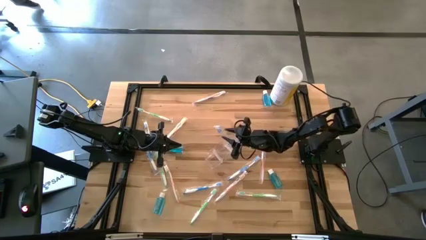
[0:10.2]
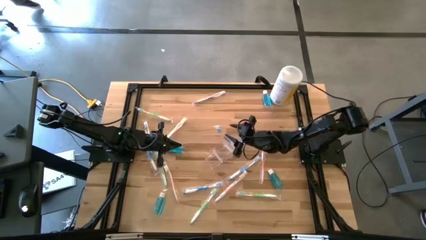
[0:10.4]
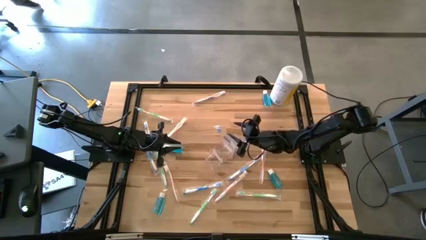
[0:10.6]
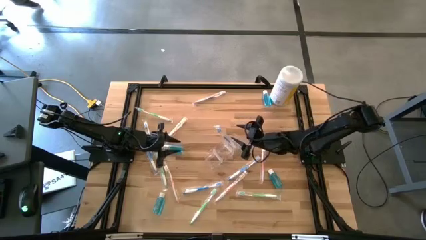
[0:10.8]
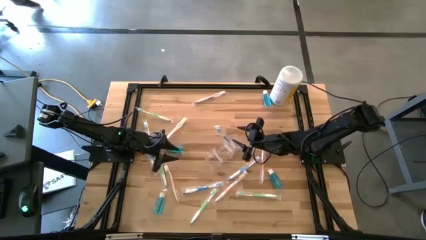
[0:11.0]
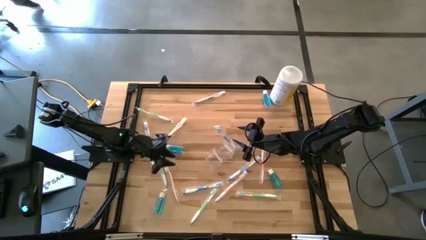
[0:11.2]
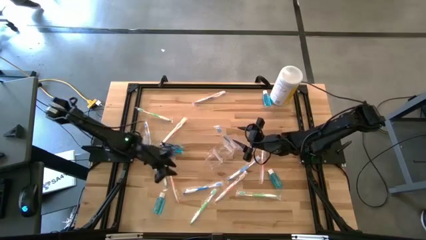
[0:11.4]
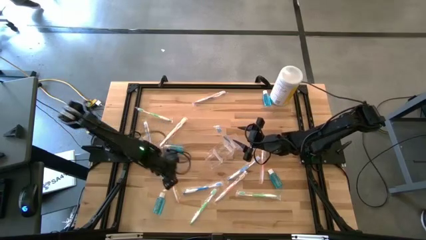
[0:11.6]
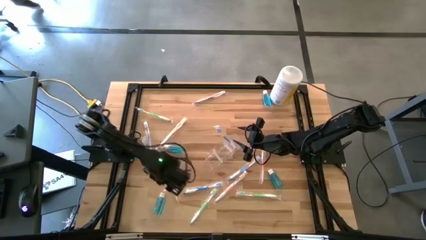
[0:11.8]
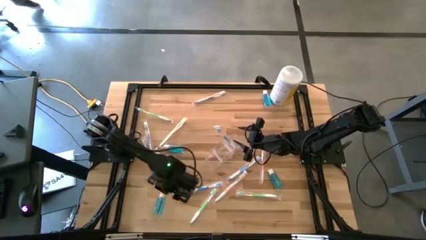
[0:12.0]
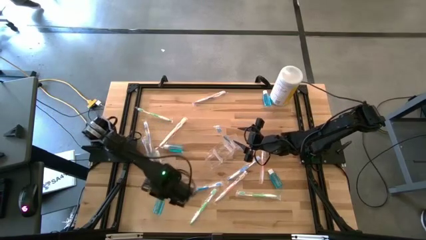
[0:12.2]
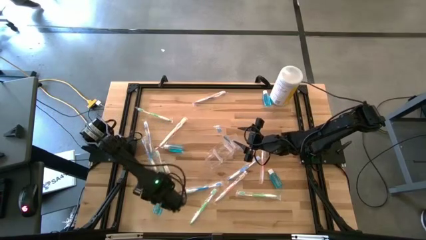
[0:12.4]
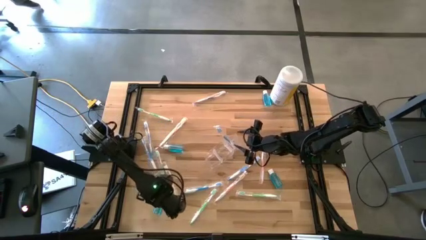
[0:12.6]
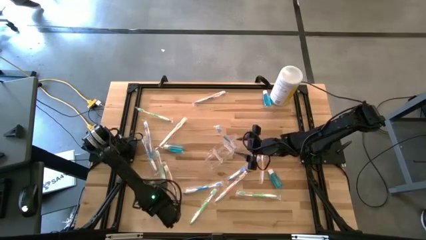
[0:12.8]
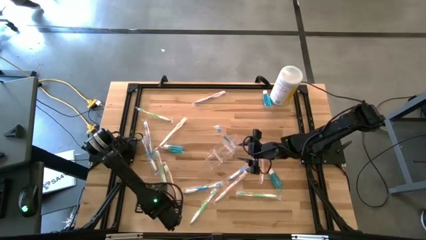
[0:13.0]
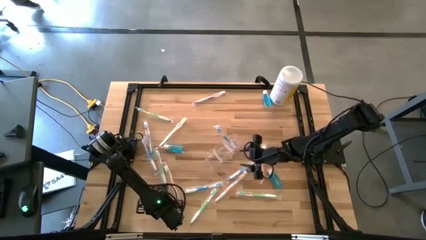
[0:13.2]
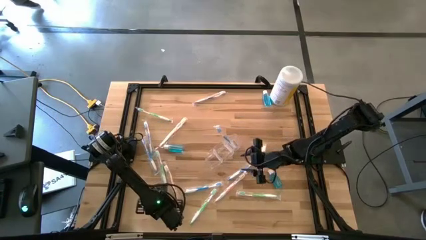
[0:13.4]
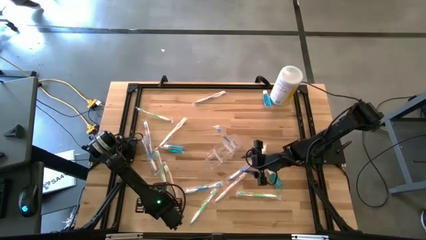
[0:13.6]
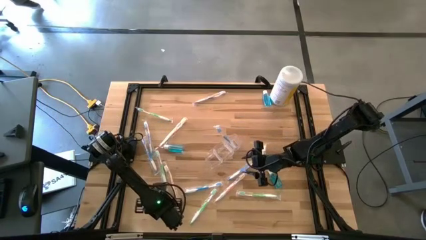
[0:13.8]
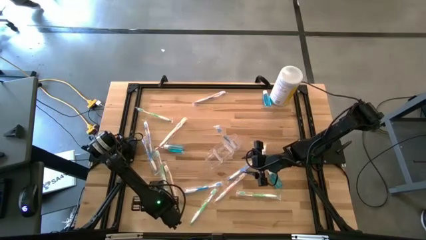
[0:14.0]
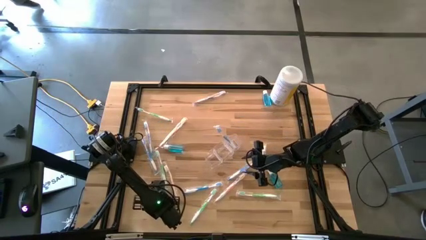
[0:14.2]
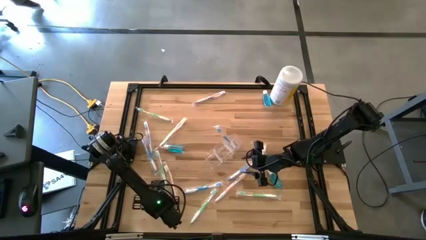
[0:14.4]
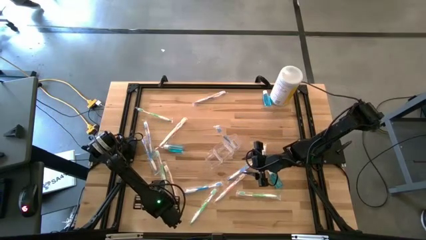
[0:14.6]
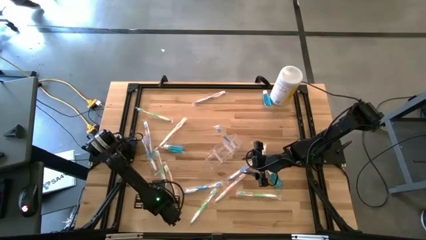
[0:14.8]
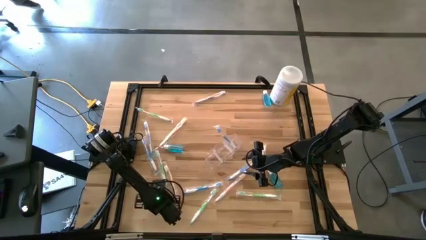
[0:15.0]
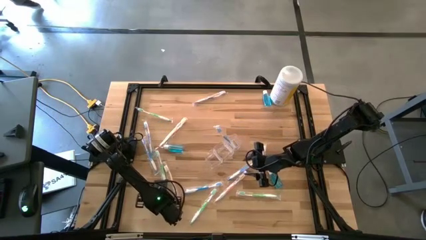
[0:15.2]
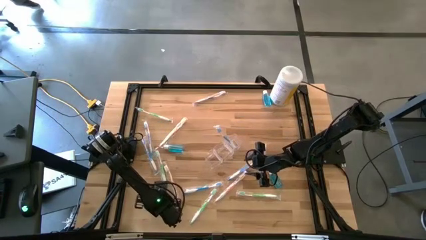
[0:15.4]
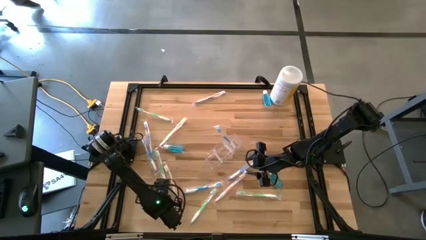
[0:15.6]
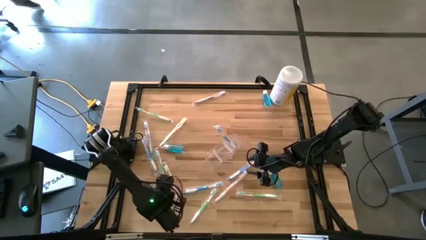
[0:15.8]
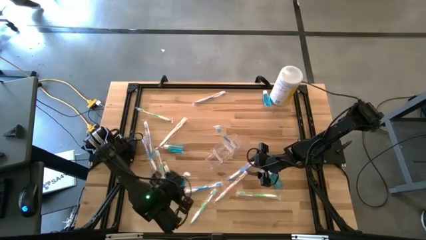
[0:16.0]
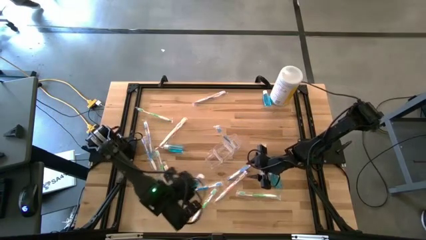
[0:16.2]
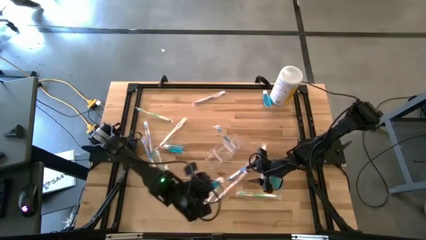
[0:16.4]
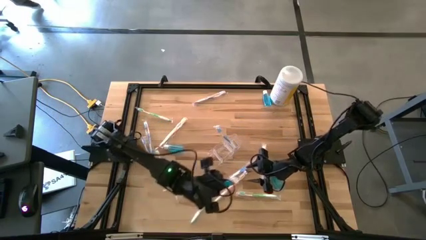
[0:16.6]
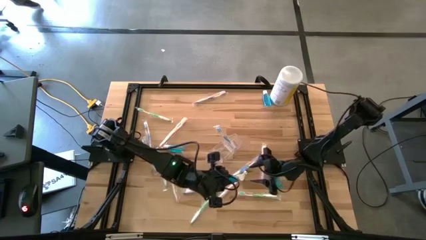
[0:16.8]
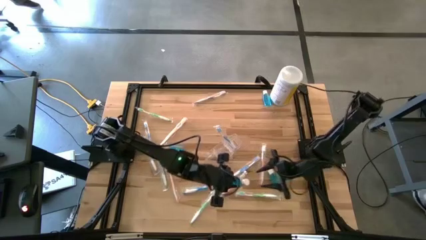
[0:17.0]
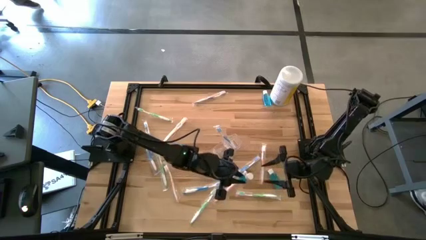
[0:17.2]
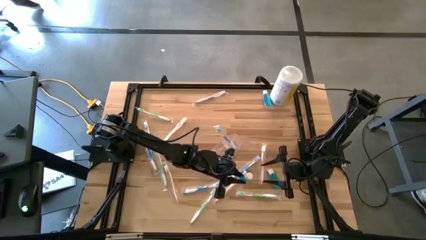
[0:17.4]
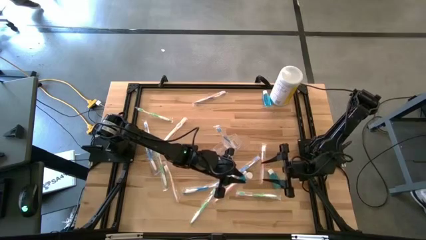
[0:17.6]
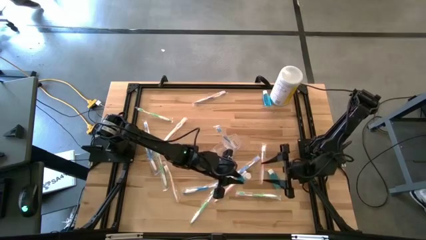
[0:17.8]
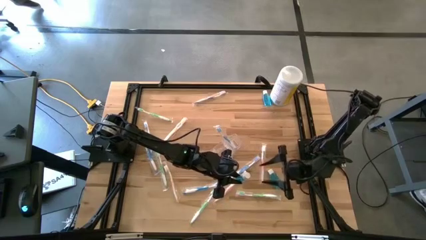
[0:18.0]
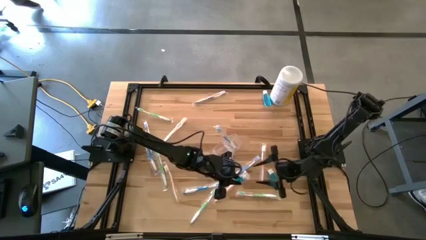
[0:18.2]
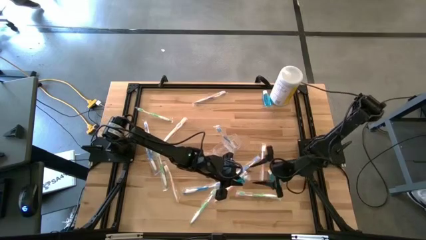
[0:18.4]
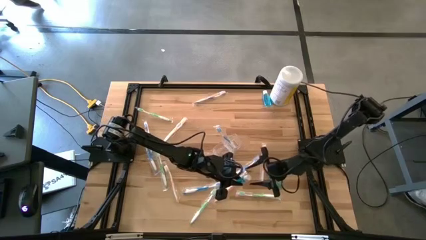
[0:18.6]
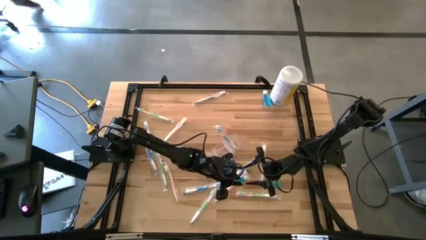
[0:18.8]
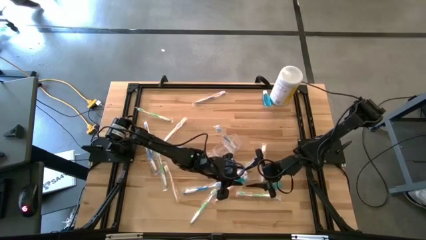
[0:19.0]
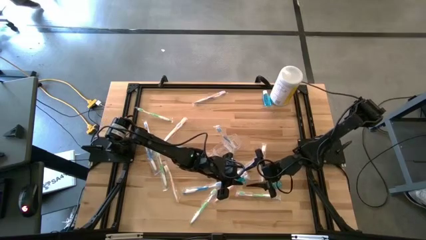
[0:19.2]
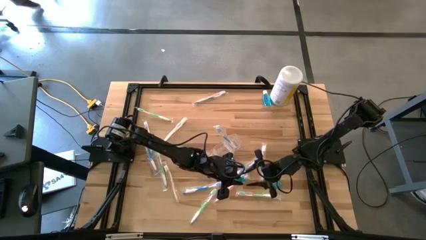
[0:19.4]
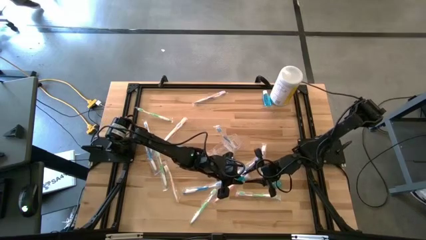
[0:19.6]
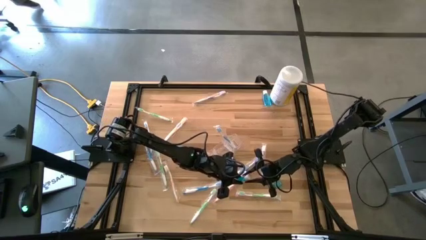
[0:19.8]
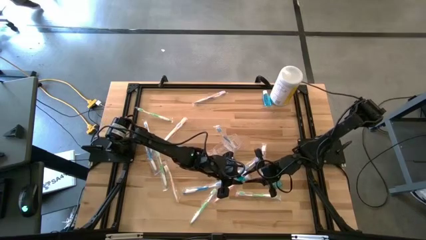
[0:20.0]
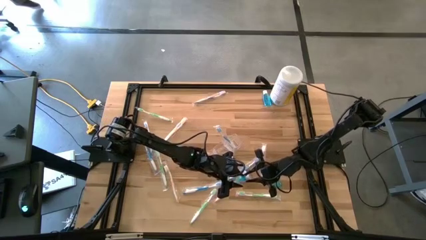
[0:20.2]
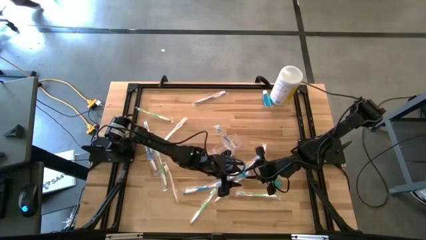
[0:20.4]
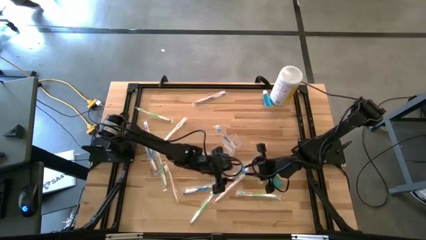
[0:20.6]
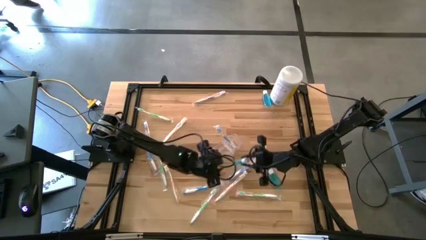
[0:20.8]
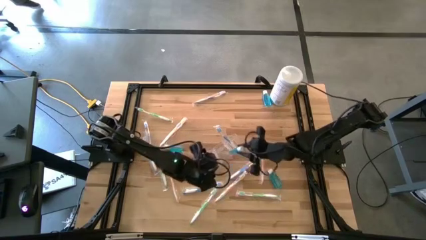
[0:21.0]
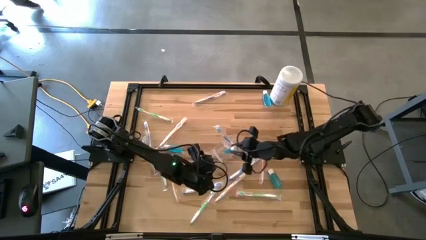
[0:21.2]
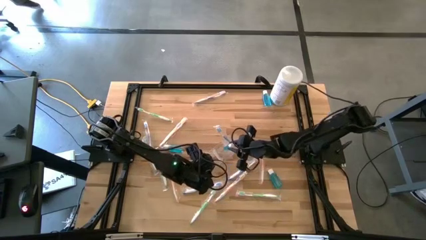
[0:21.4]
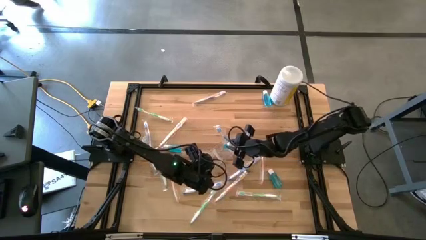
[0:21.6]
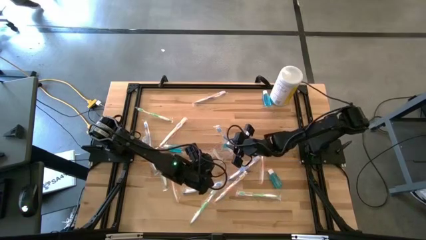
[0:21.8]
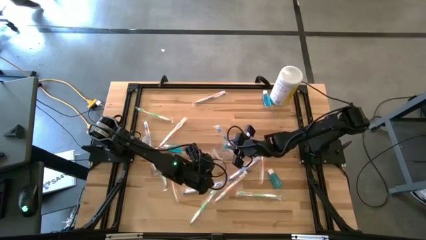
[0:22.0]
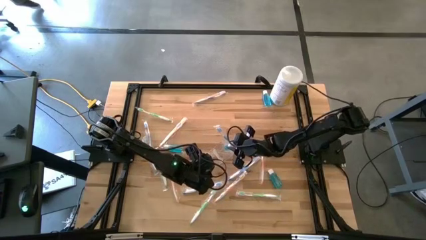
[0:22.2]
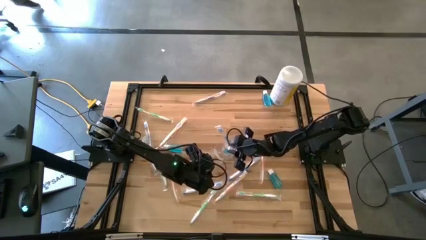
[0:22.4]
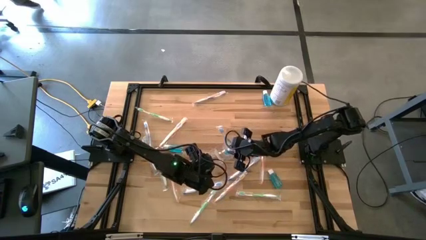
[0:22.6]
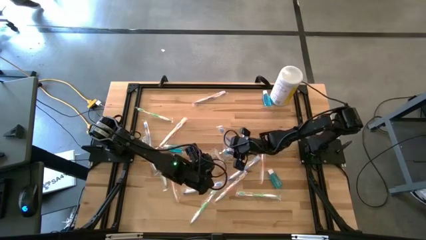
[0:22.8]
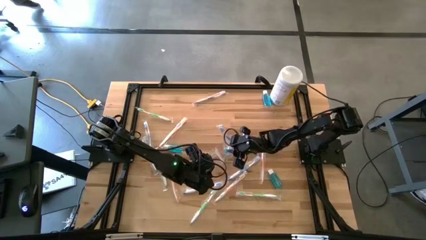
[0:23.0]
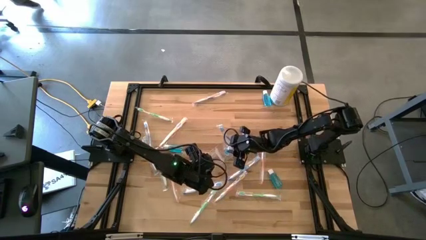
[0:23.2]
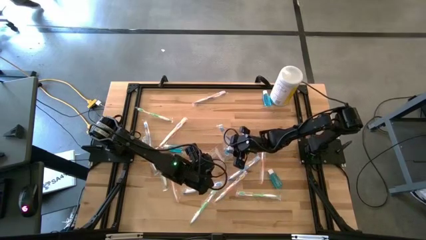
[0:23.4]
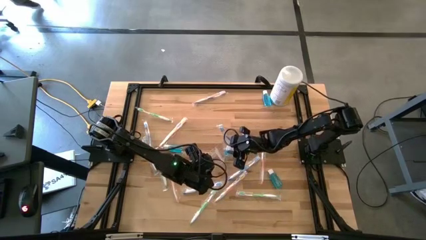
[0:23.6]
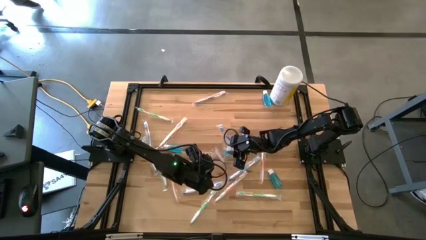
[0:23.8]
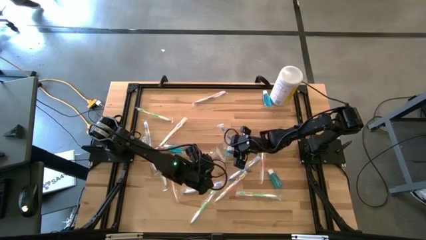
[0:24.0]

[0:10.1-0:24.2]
Task: Pick & Place toothbrushing station
Put the blue mouthwash into the transparent organizer
